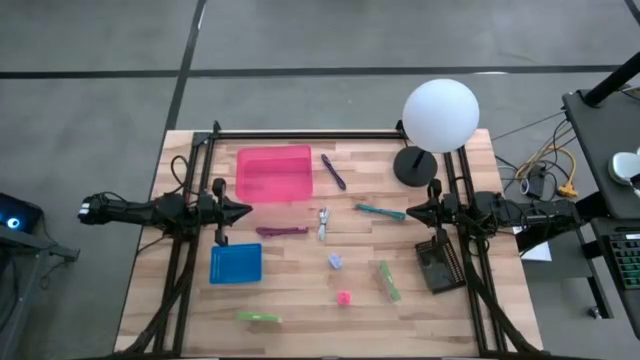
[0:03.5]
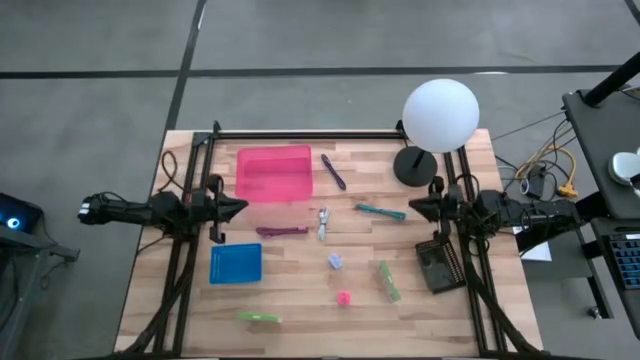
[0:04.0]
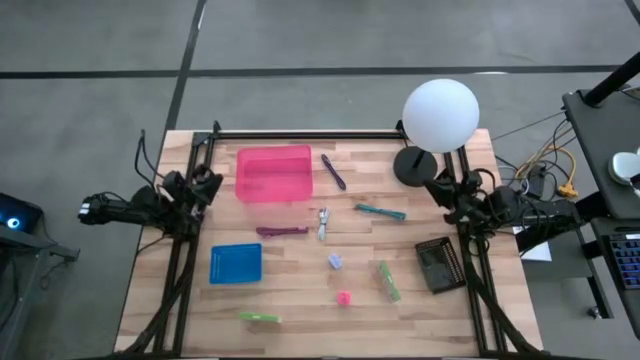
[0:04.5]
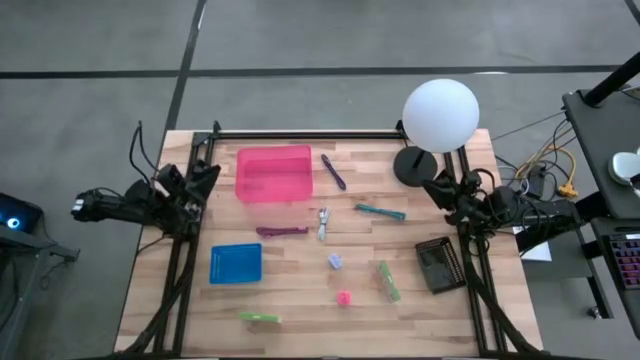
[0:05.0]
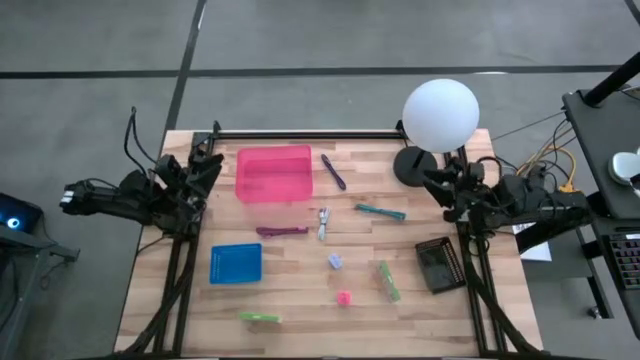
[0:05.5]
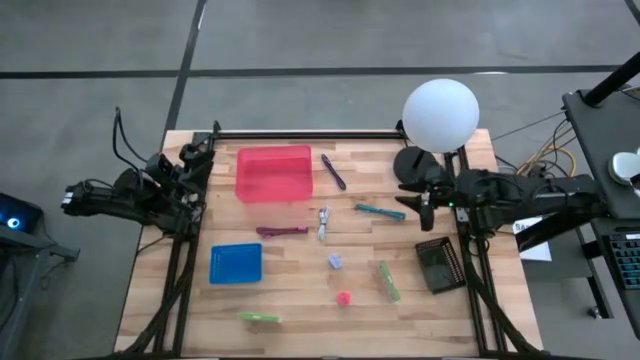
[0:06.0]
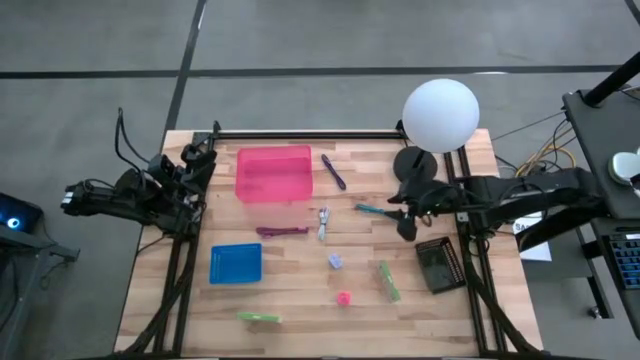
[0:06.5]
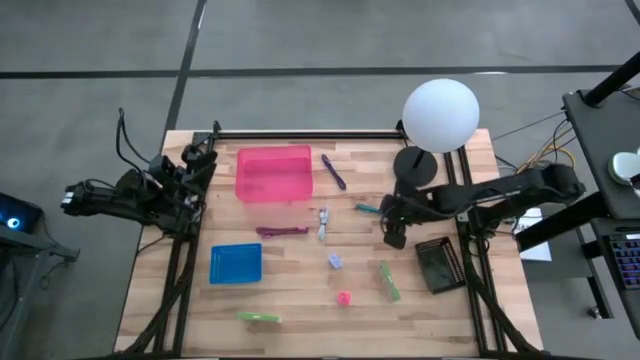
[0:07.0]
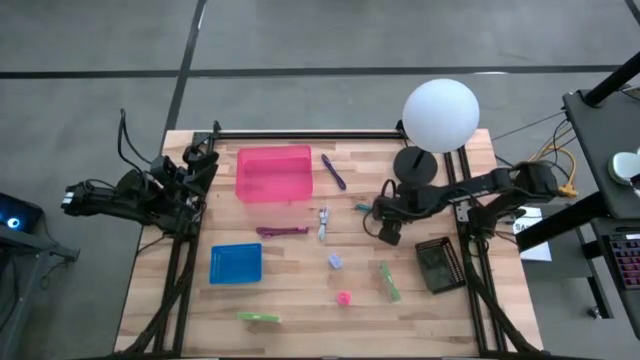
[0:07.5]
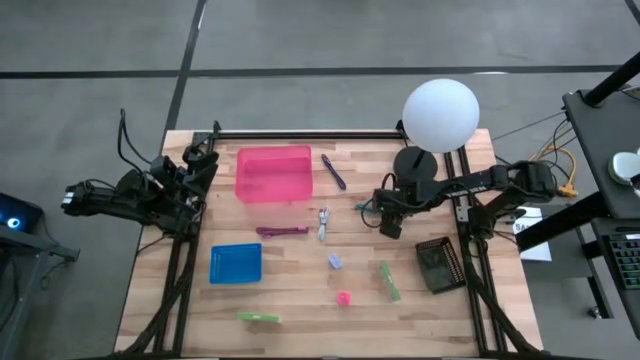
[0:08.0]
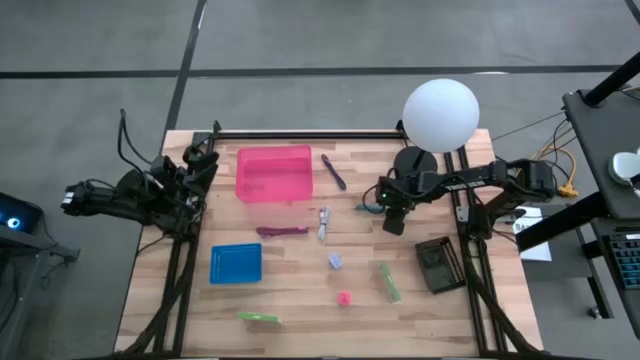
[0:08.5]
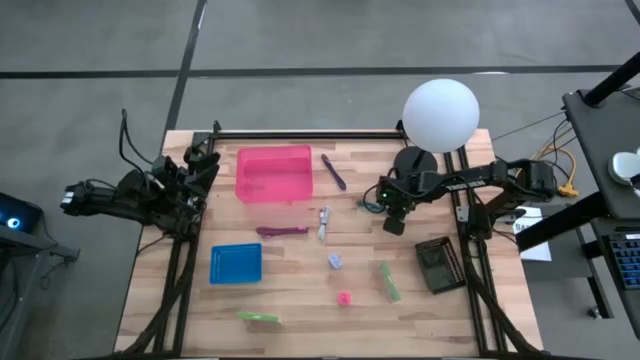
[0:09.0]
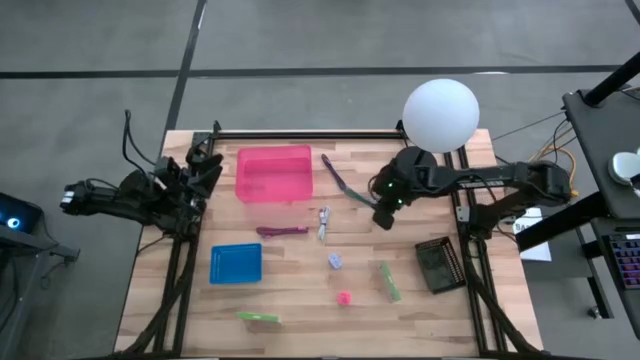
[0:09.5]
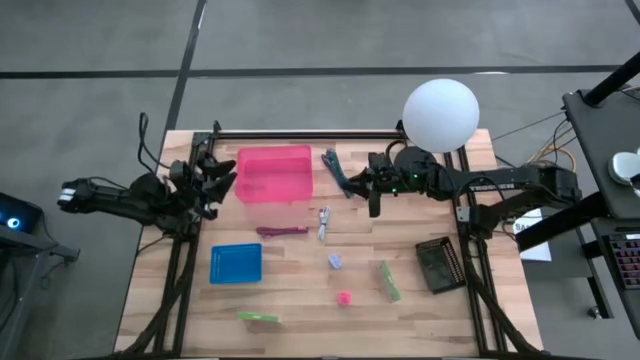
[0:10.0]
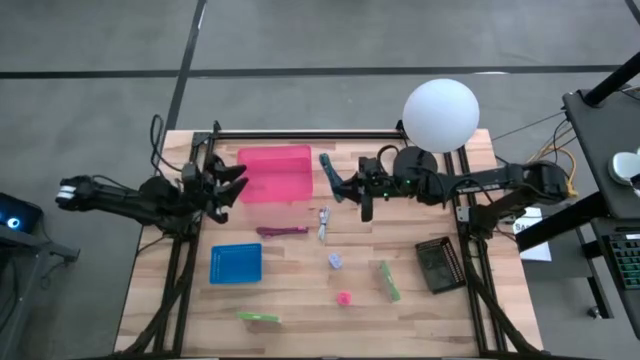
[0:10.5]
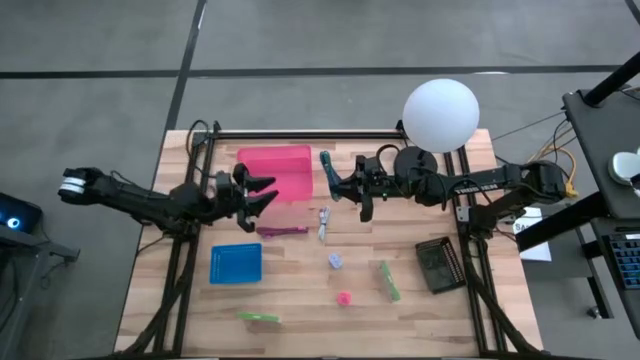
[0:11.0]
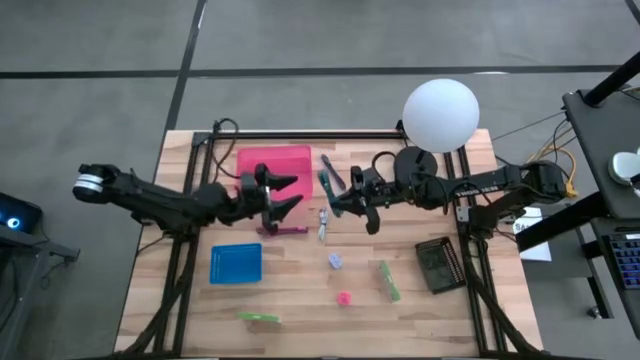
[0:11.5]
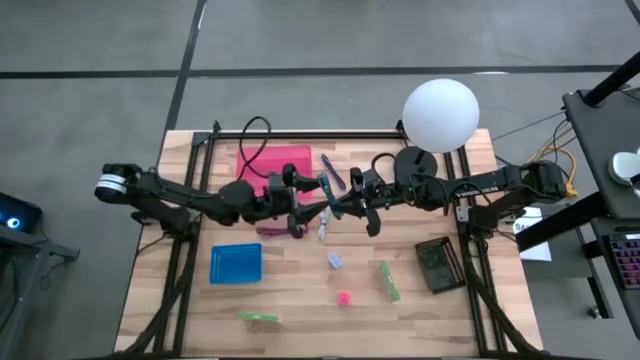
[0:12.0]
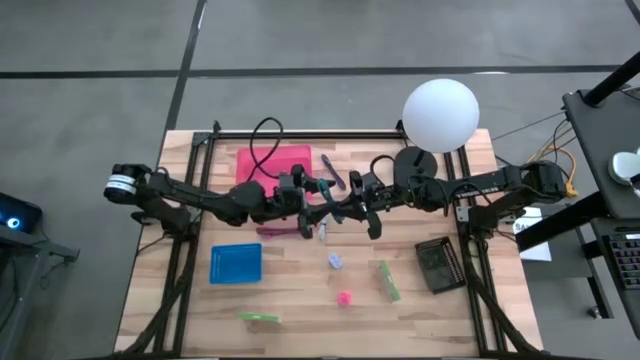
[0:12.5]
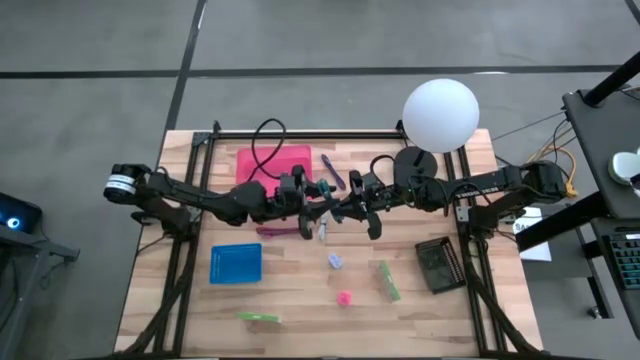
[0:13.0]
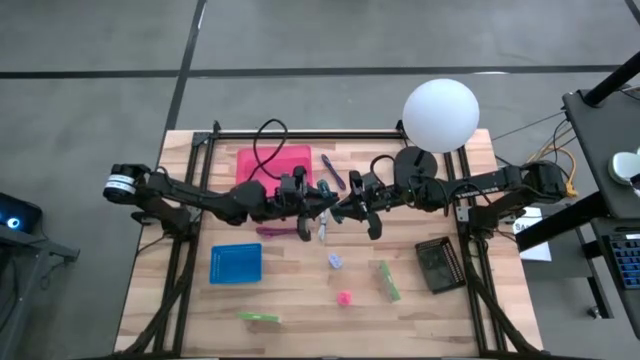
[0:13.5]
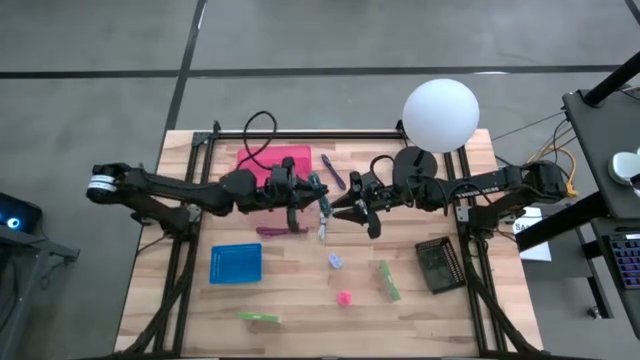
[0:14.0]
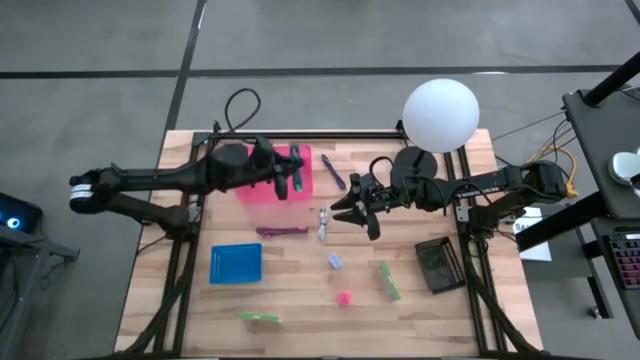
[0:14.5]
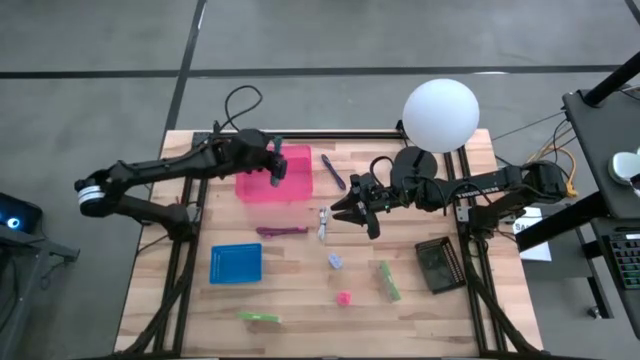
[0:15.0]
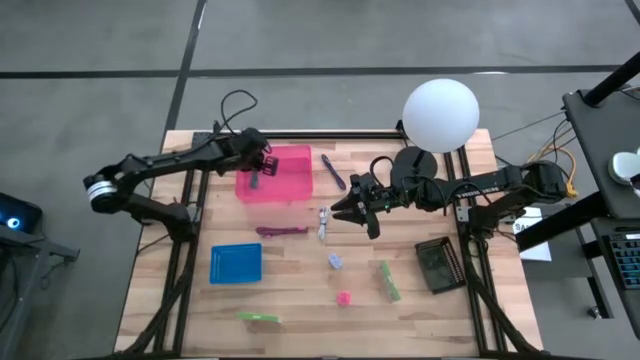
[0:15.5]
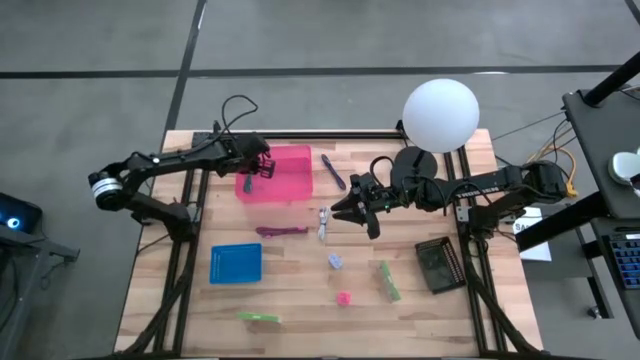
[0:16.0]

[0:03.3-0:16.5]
Task: Pick and place items into bin
Put the blue charger cable into the pink bin

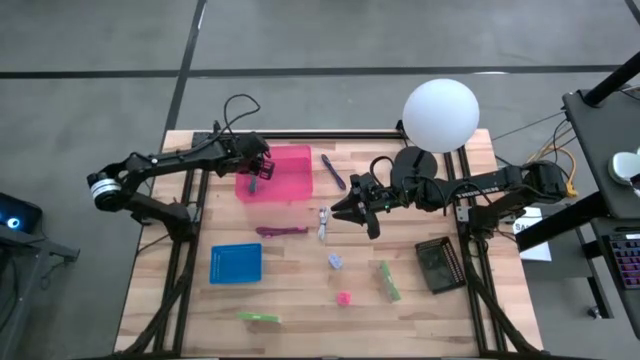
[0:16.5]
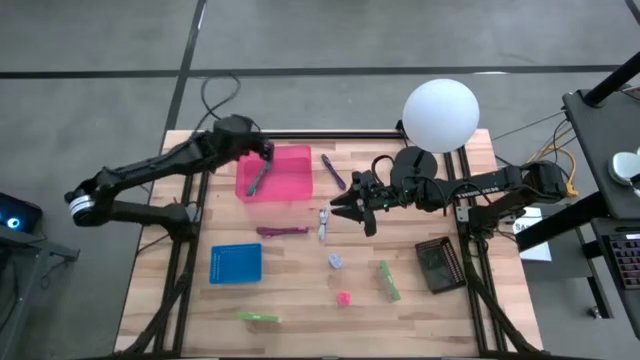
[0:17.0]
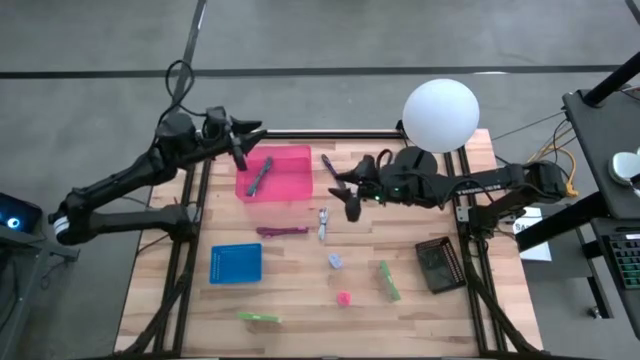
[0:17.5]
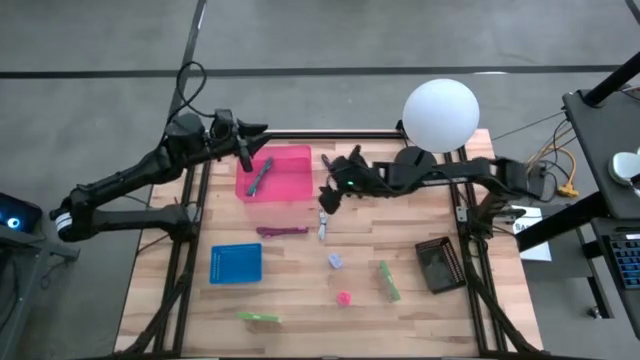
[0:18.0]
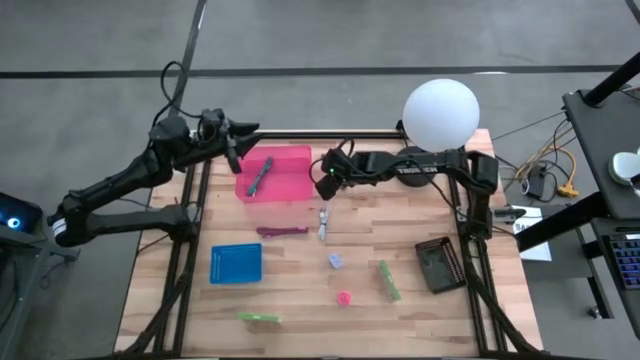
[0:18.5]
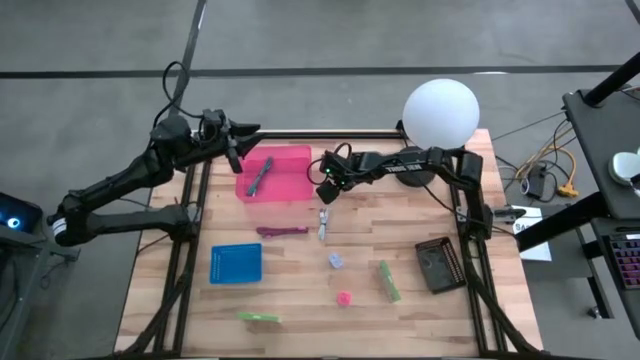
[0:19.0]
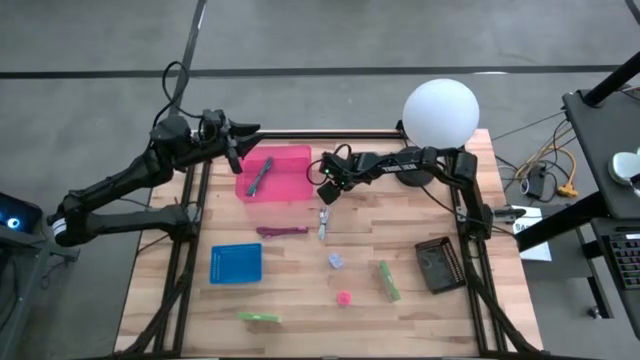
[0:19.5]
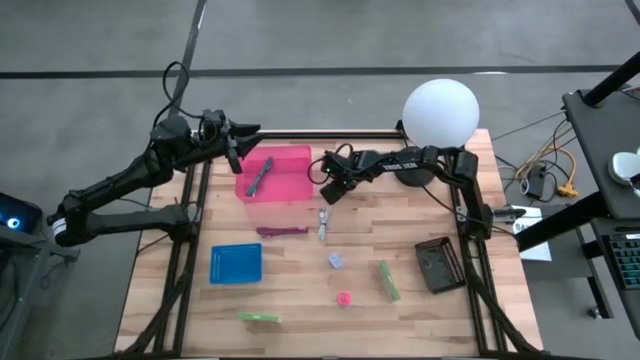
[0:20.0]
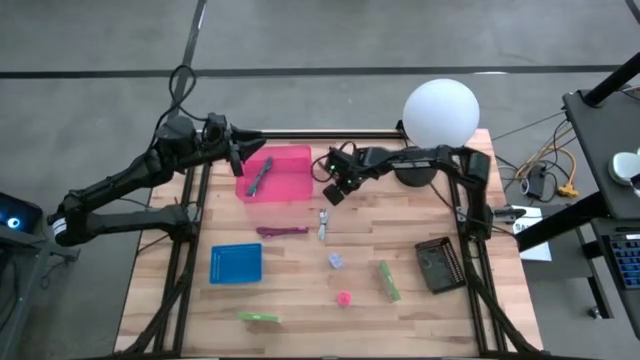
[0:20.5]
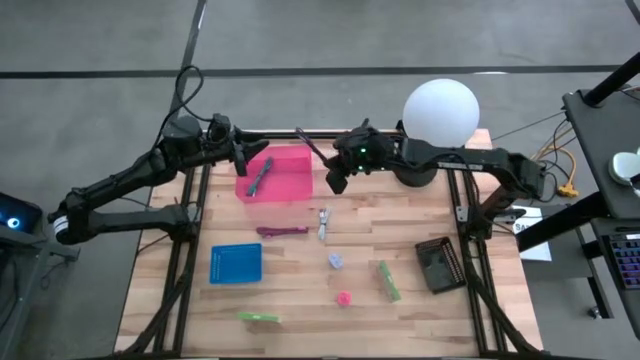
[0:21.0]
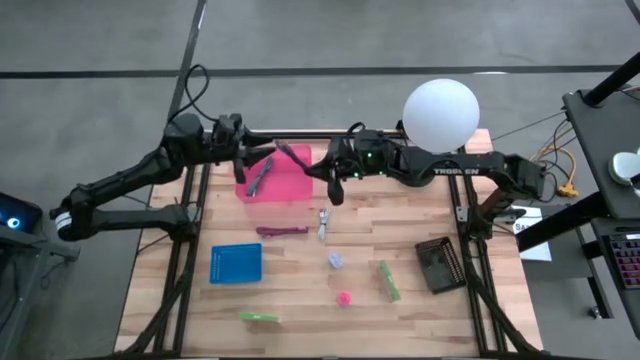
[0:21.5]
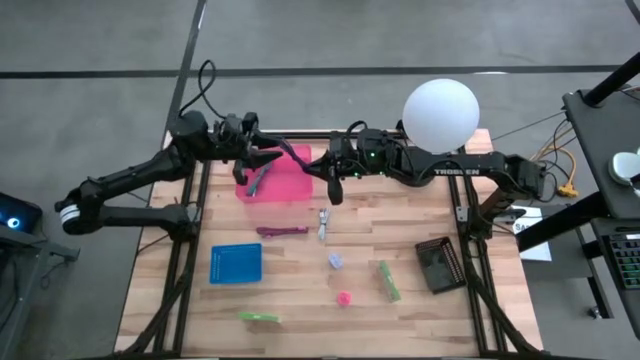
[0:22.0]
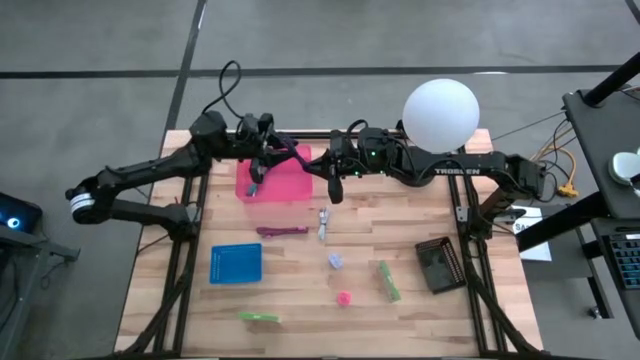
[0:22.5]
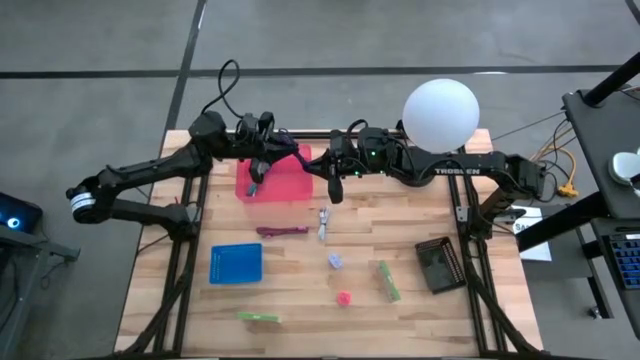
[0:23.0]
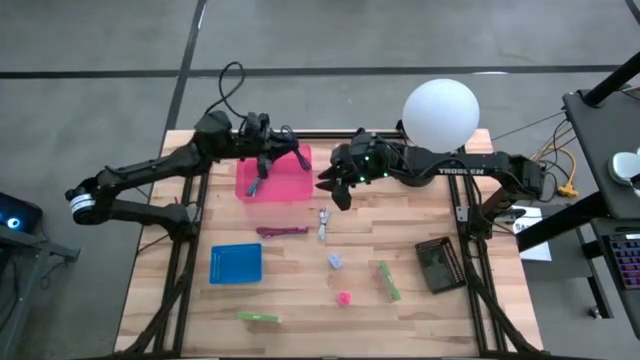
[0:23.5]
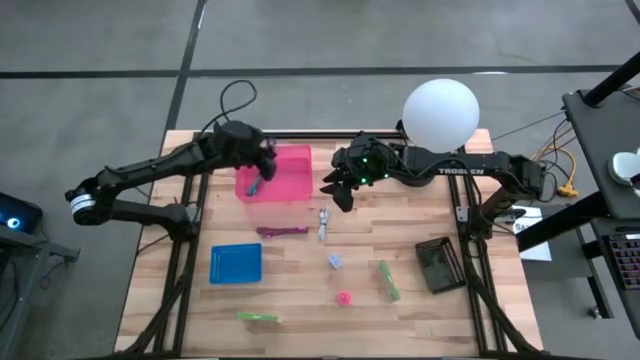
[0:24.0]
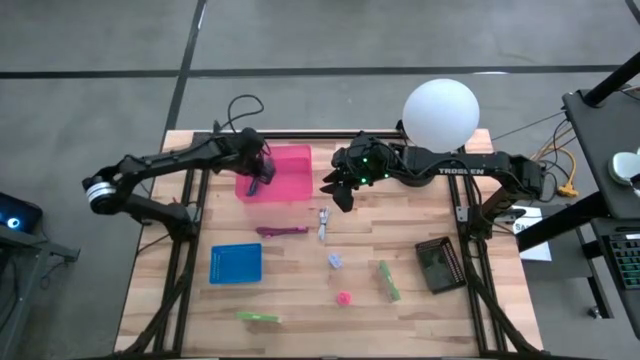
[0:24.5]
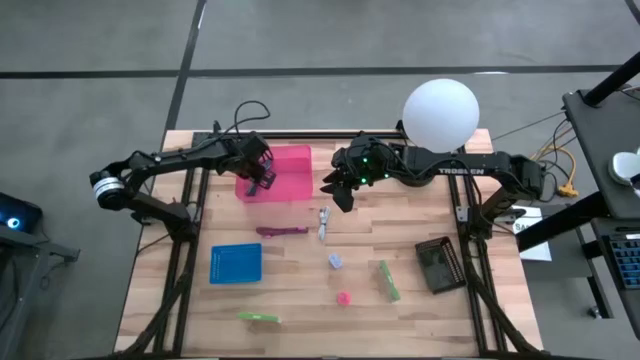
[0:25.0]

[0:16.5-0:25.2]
Put the purple charger cable into the pink bin
